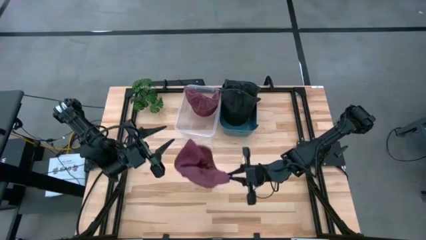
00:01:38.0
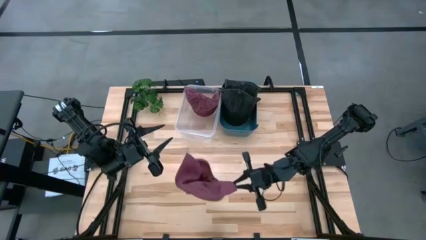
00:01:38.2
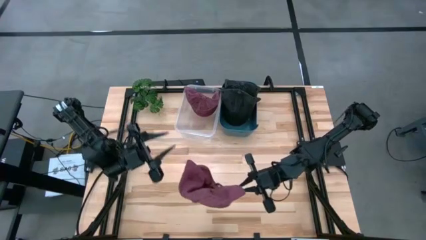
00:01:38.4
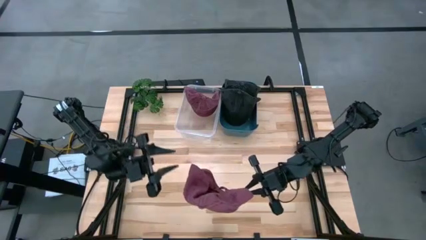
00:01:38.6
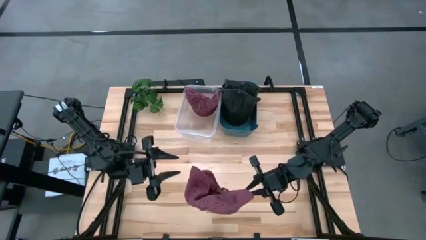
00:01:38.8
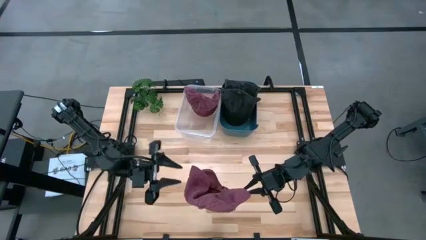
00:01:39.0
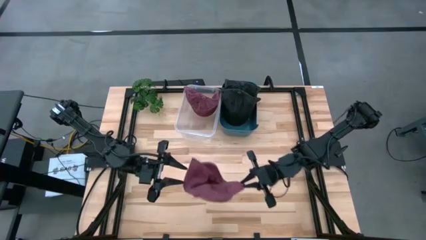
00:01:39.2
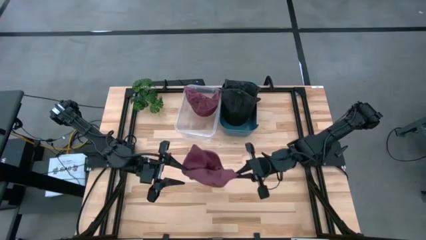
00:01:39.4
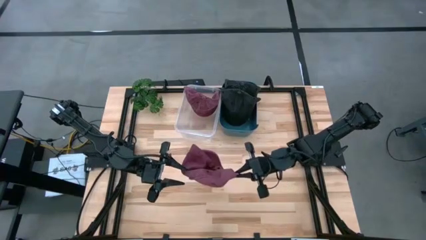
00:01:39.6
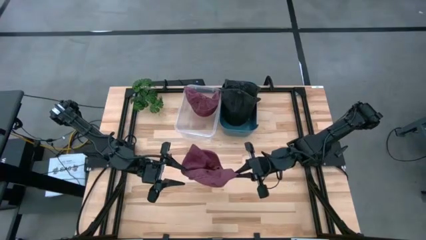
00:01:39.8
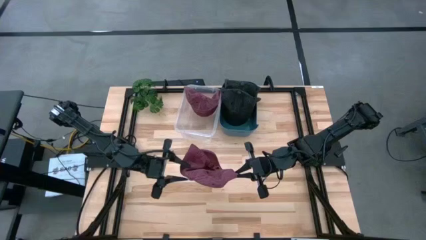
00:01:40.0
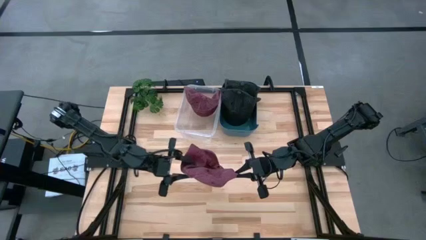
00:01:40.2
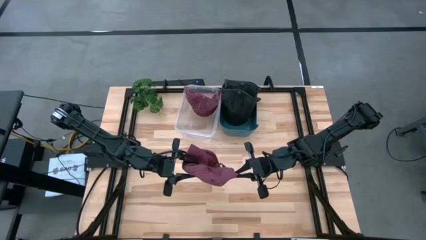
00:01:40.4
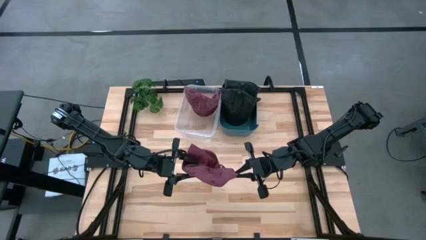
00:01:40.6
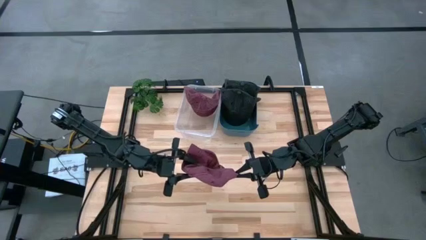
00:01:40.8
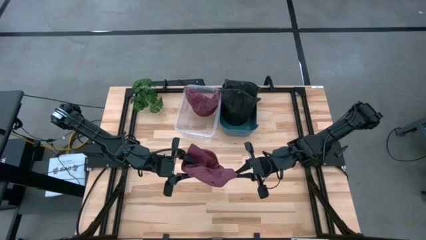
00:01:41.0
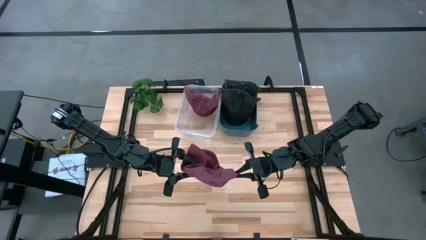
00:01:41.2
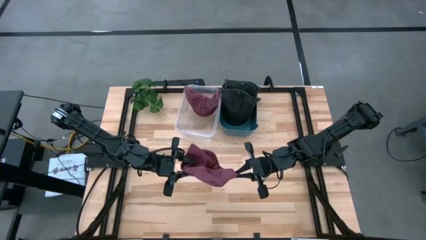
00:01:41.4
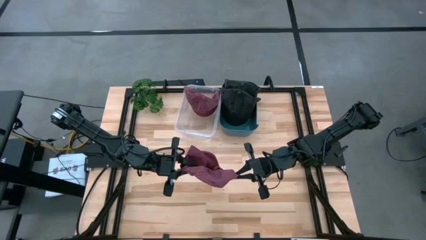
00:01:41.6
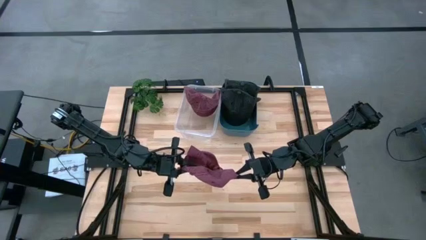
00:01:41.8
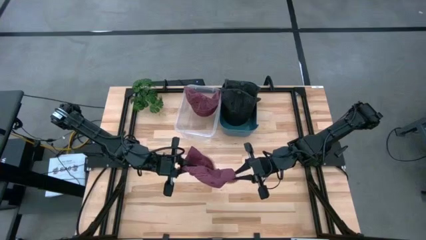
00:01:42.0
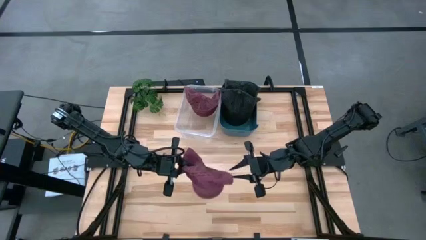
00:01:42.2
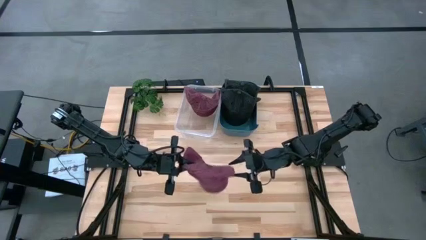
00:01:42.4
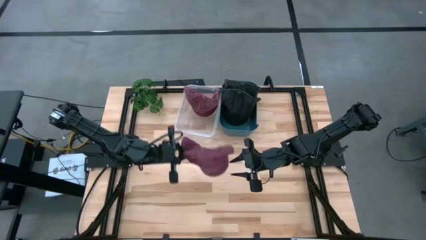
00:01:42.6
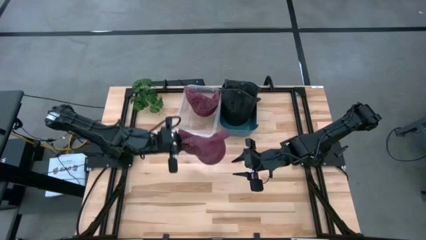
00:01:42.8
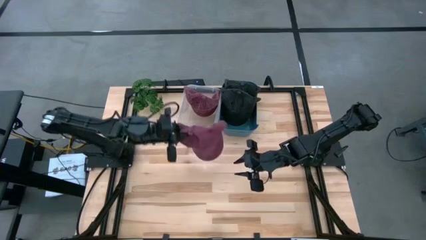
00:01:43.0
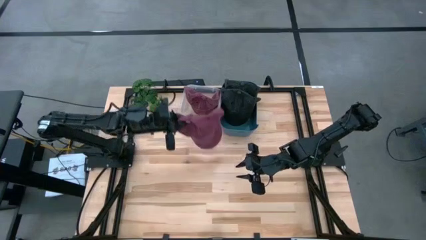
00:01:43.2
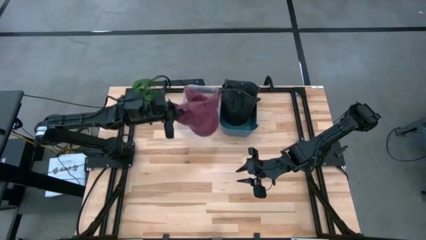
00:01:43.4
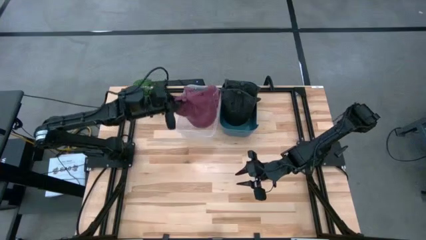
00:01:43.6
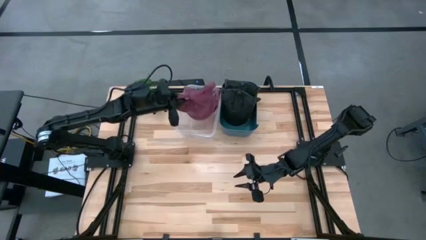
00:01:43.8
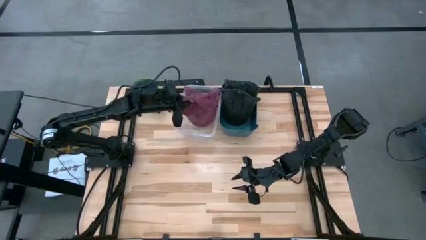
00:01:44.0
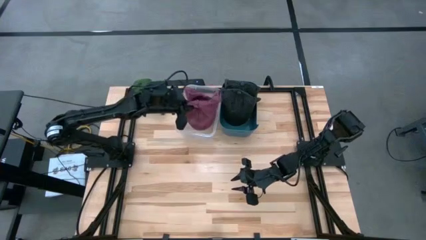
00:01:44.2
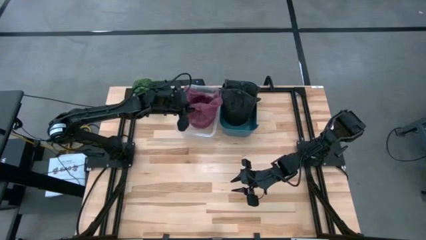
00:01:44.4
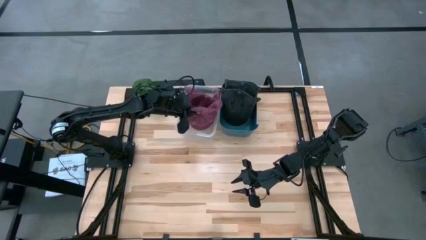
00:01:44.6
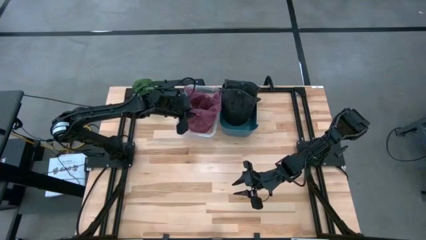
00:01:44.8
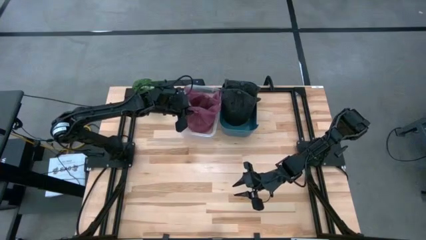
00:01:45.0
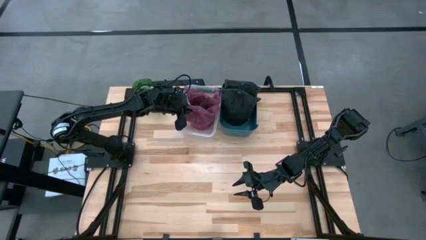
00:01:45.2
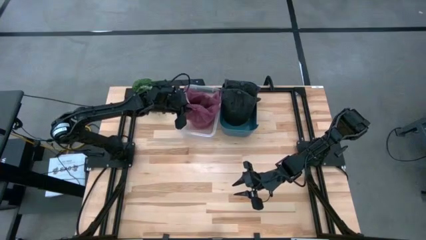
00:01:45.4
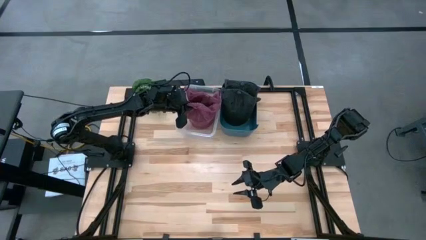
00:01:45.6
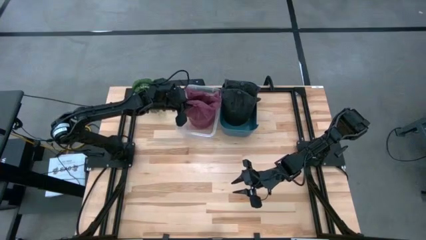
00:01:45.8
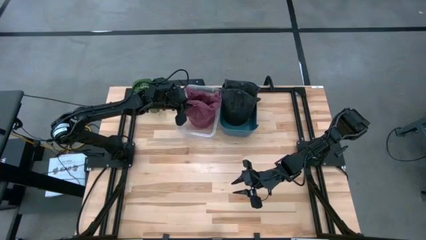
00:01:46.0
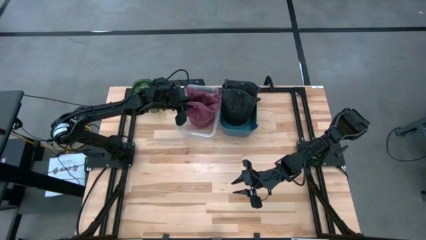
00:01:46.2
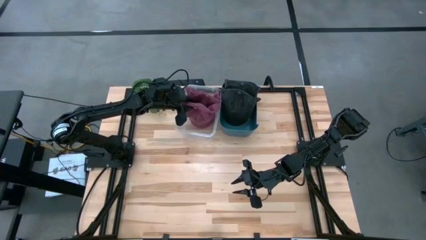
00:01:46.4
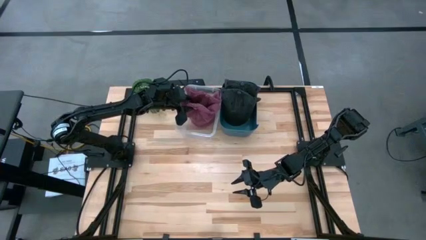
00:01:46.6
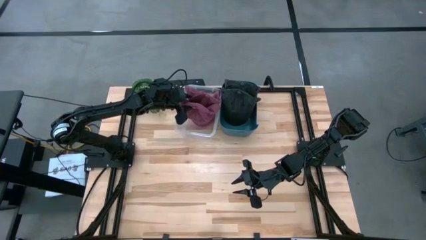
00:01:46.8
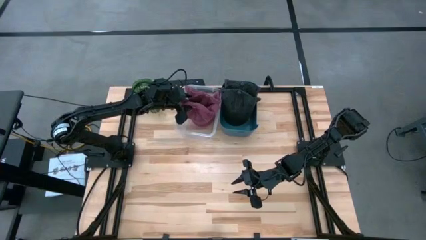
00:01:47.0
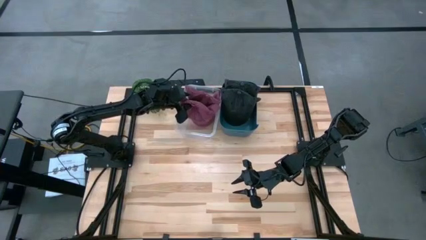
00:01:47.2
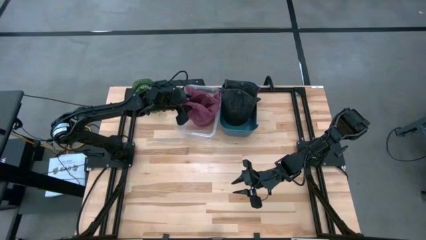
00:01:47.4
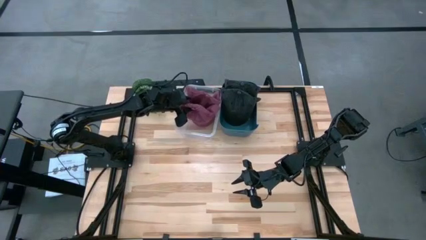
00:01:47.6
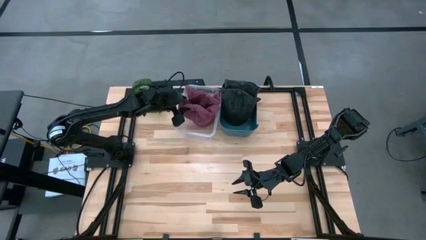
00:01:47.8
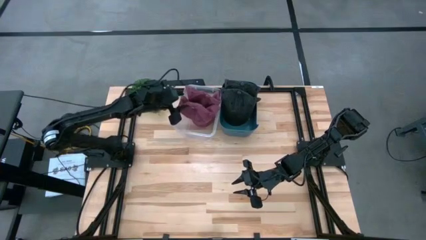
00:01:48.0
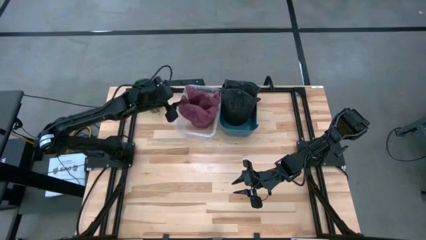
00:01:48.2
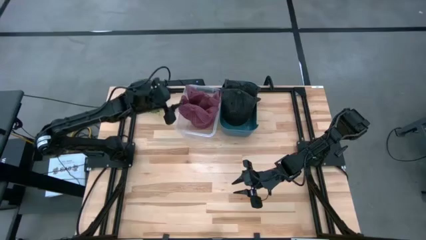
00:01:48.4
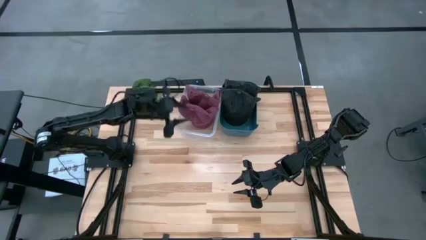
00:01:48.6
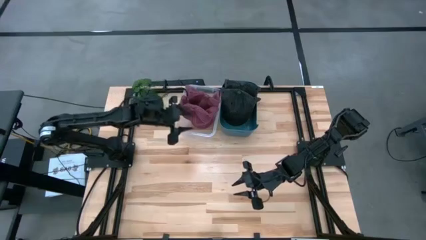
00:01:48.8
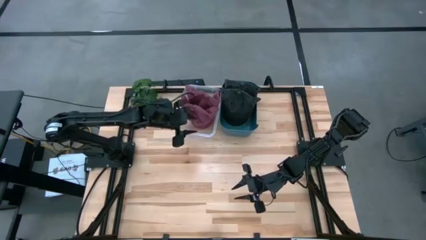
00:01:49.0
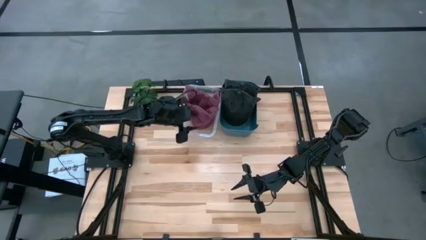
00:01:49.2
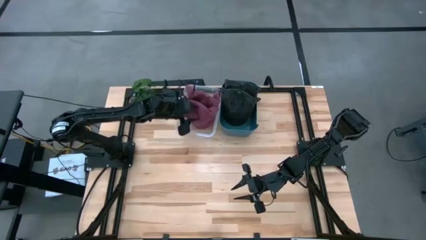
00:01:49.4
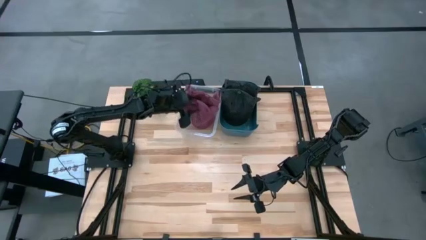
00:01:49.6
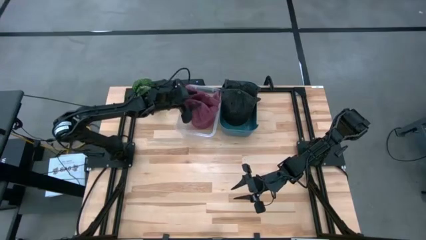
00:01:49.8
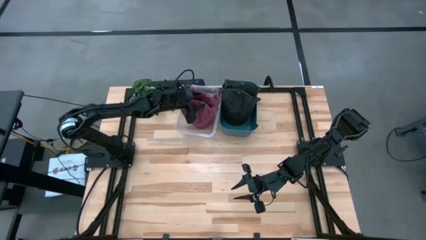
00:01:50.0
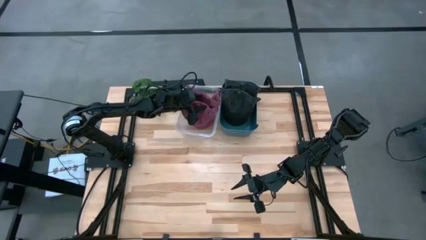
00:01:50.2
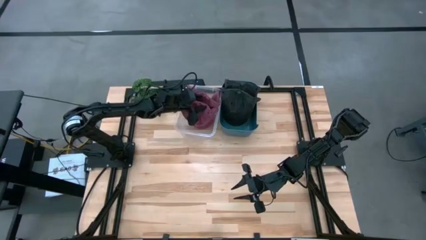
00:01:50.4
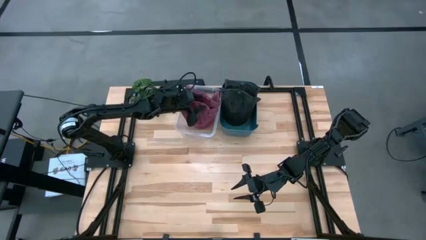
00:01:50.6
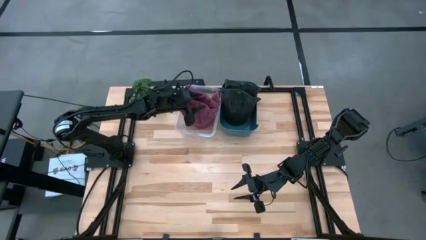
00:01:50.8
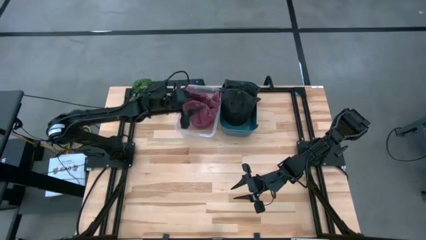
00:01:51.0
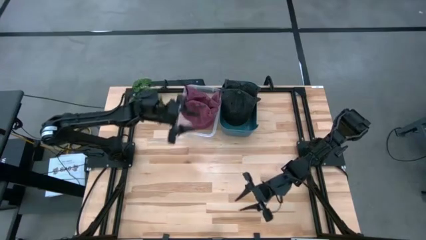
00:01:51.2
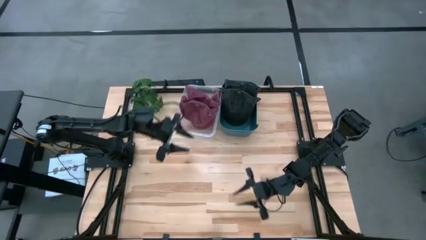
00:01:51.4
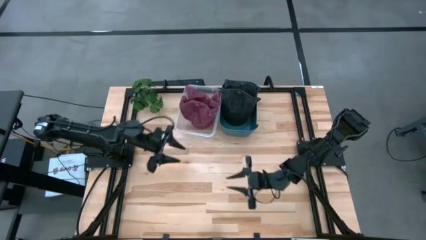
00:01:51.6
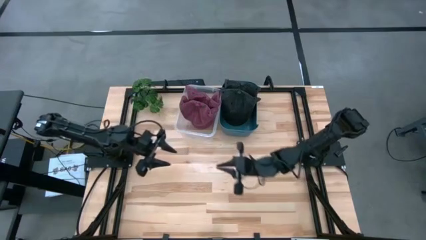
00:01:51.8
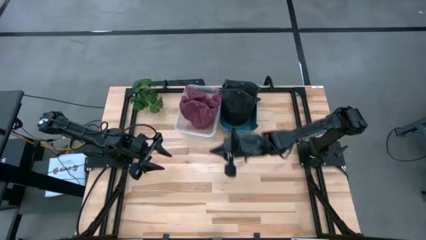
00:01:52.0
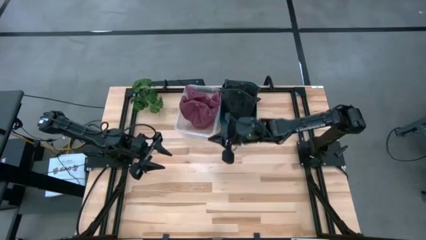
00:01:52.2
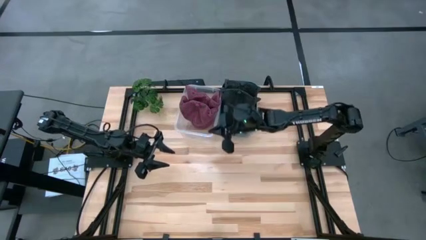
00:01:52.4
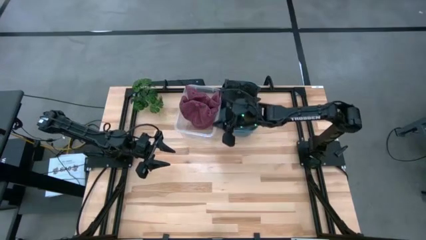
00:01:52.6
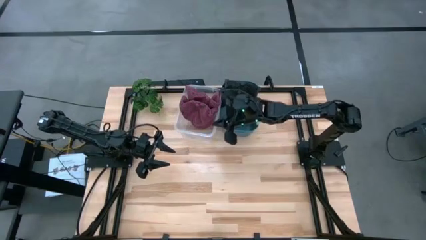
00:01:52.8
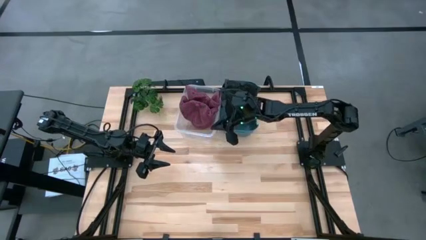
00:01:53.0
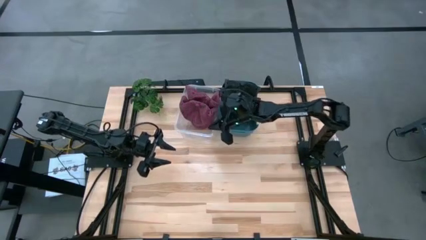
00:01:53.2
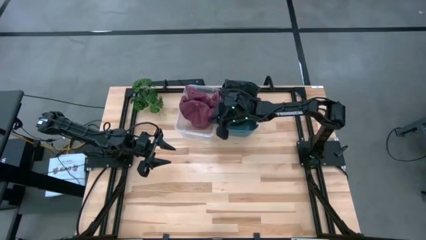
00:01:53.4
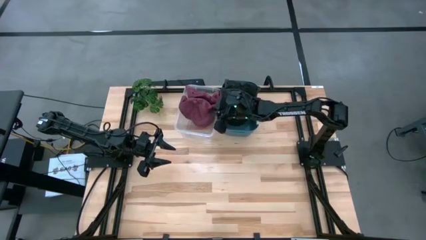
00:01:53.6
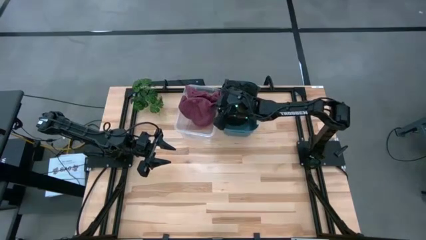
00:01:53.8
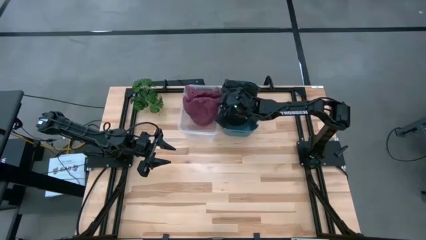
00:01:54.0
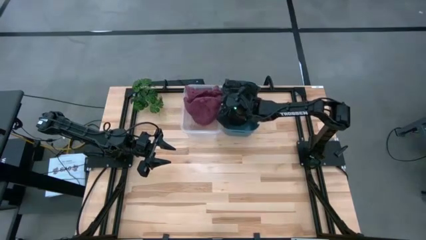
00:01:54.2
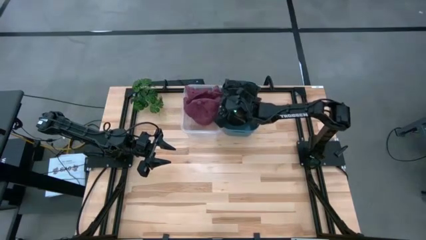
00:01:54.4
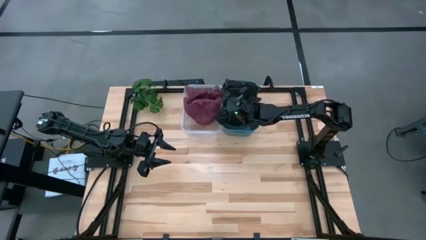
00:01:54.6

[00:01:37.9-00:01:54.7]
Task: Pick & Place hat
Put the red cap into the transparent bin
